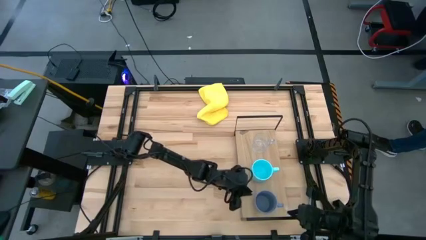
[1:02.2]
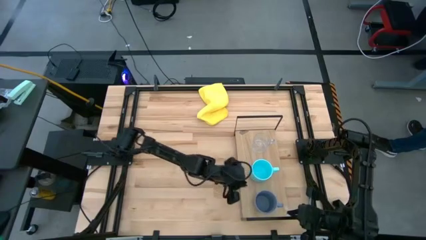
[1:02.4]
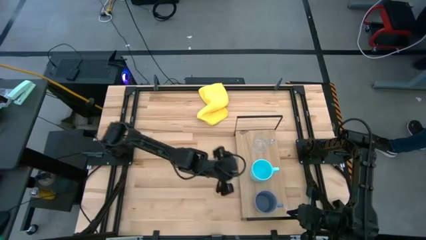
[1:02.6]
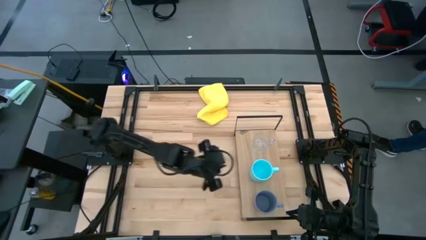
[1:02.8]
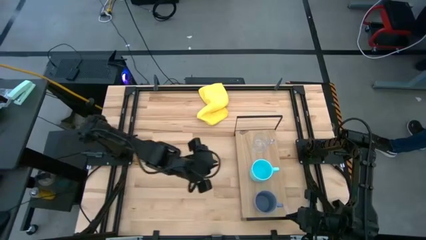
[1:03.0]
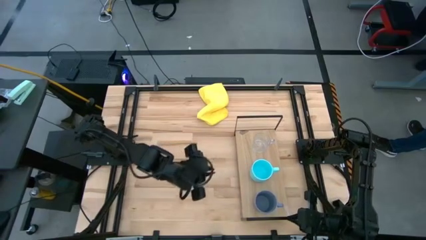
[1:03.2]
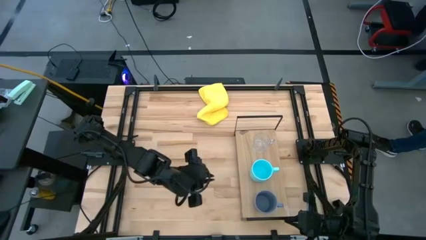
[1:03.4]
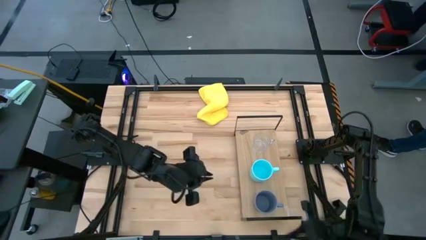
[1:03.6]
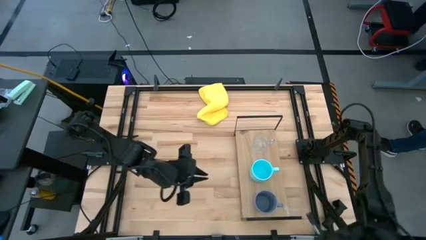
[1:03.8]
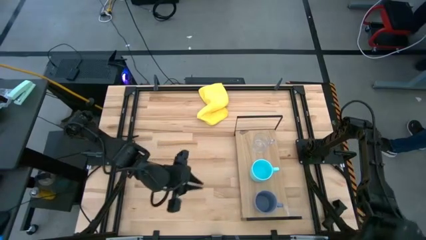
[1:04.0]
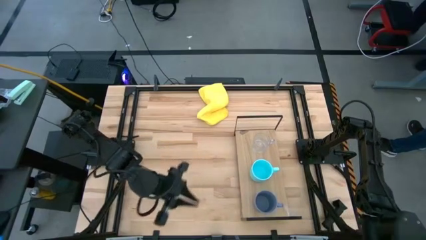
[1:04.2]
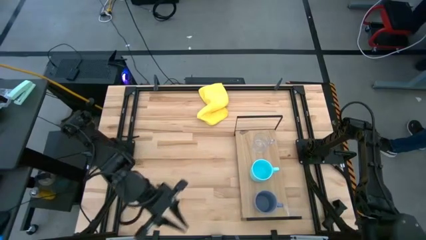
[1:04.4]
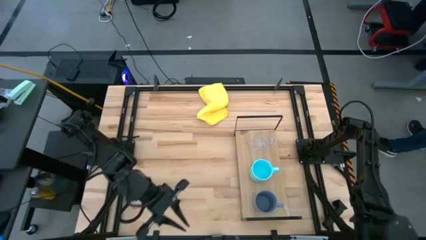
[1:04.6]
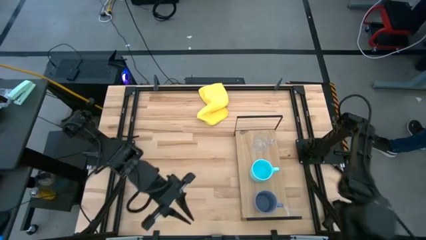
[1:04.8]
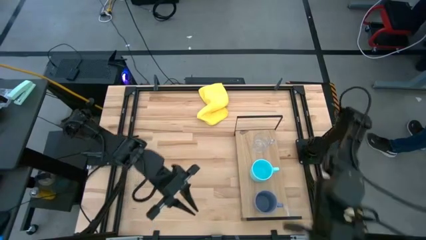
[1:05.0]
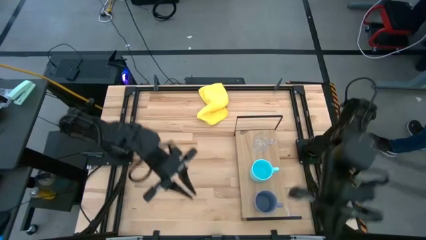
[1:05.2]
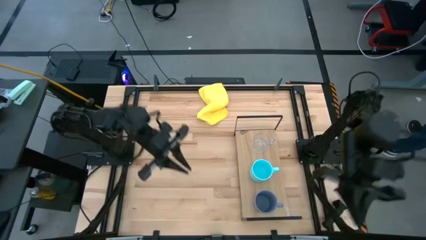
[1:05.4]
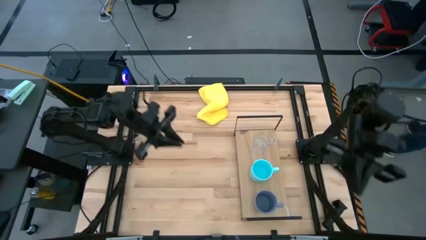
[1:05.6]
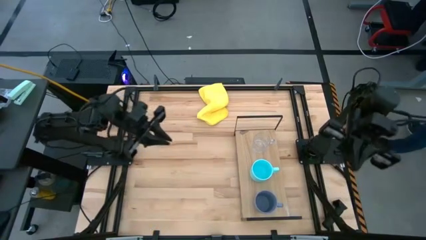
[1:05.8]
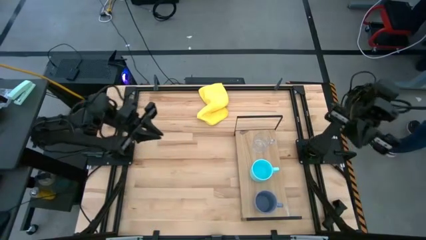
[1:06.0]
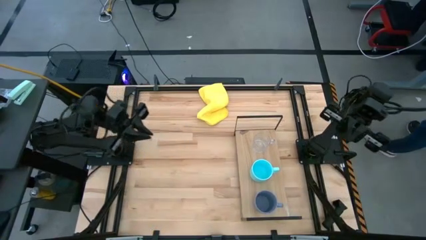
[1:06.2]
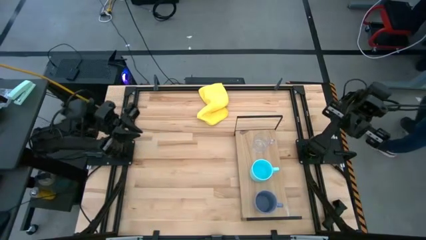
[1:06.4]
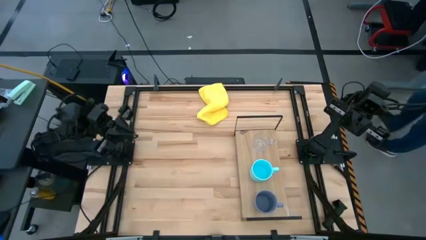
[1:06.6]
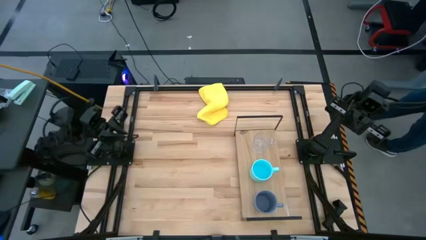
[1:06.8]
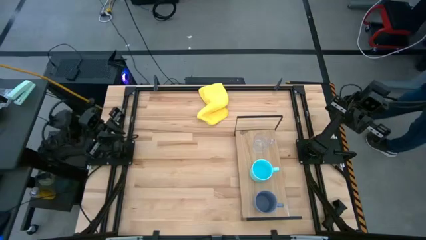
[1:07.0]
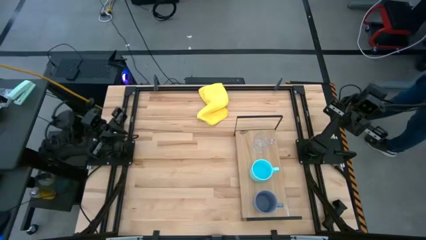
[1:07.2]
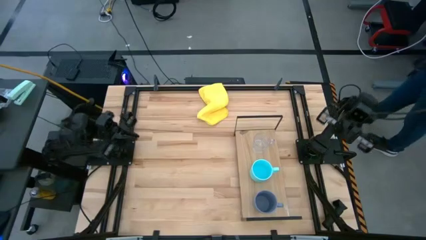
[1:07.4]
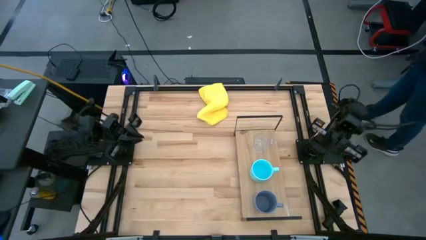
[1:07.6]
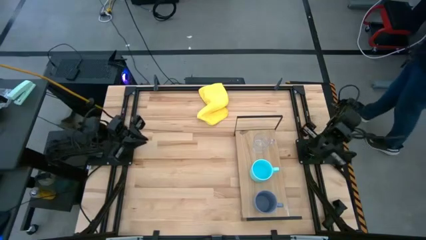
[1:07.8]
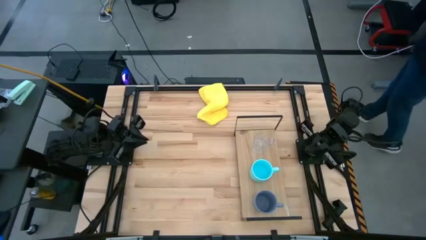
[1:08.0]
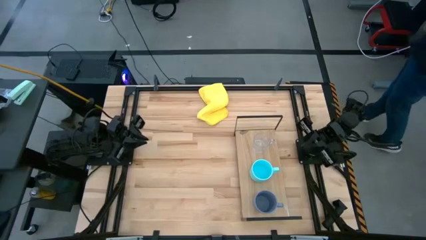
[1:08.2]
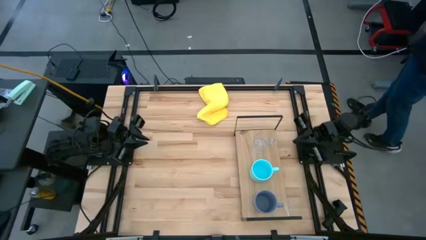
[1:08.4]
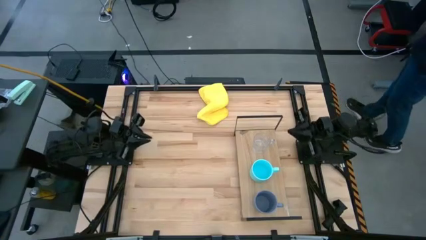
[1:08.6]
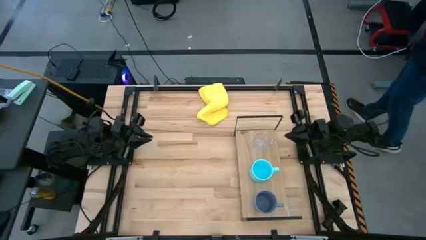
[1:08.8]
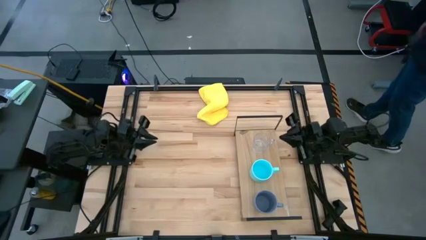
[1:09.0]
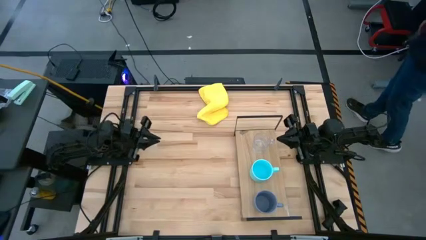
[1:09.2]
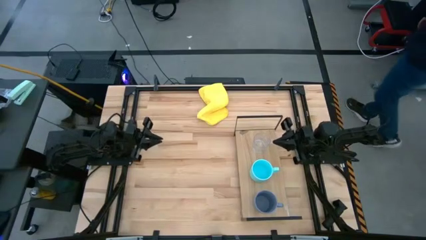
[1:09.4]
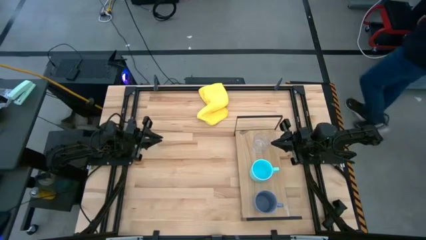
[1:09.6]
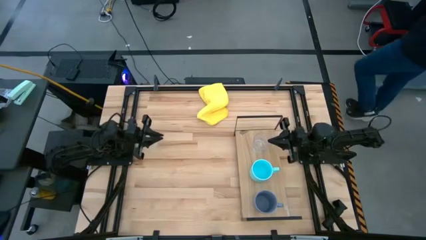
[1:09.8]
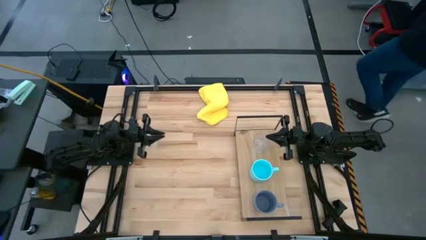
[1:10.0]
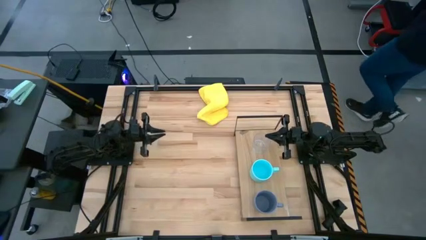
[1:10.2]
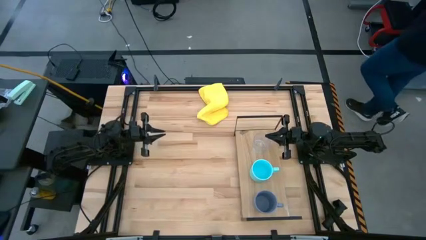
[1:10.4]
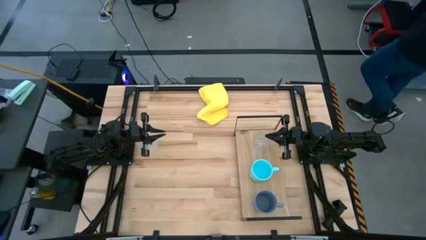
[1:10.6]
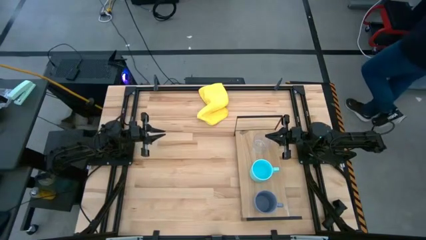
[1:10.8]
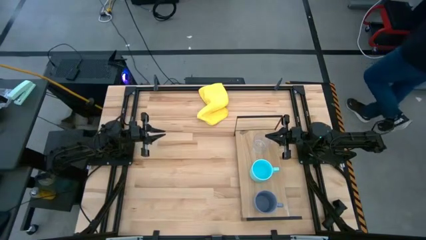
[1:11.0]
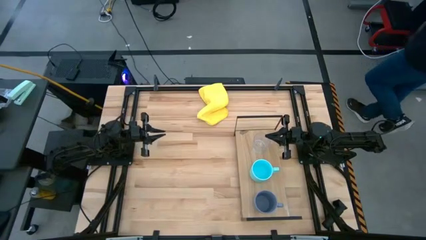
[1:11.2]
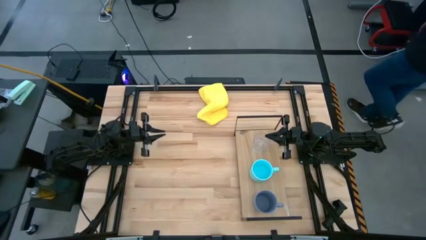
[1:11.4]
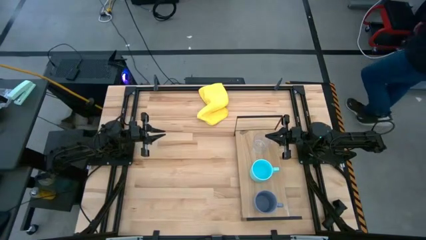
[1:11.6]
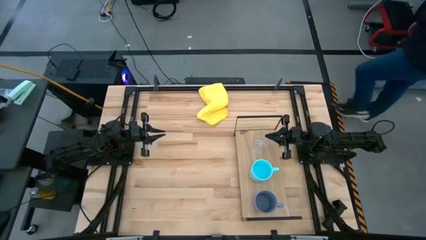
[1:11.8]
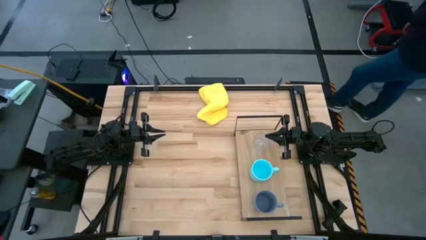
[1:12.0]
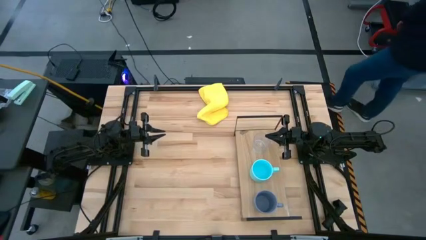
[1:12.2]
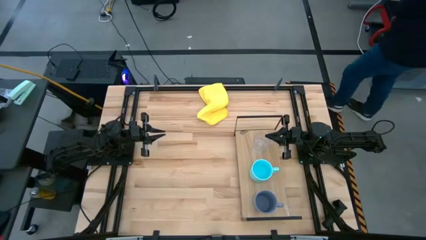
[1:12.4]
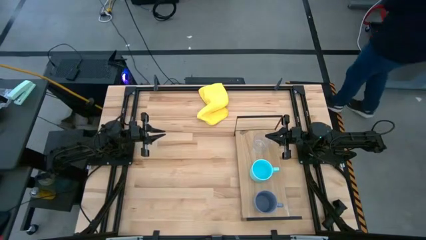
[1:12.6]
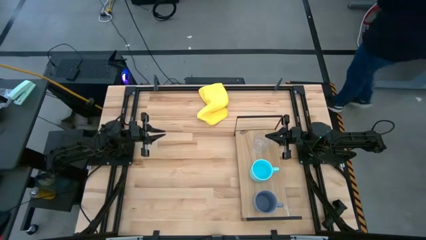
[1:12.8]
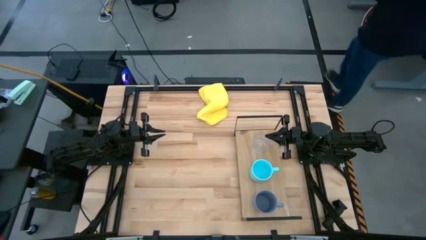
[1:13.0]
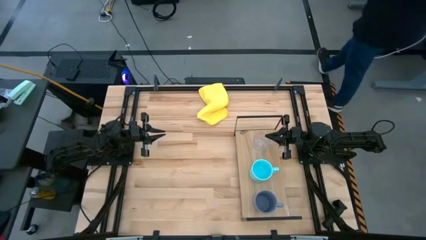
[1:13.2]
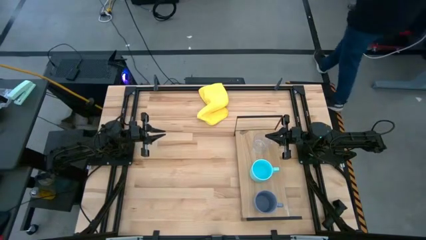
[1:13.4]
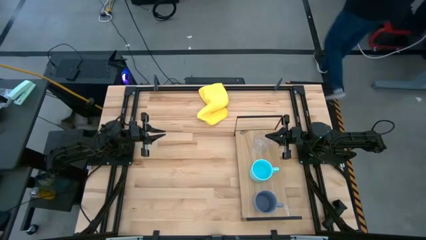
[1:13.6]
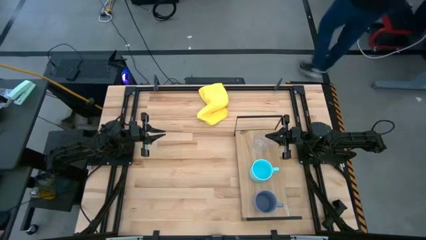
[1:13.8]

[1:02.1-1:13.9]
Task: Stack small to large cups/mugs on shelf
Return to Home Position

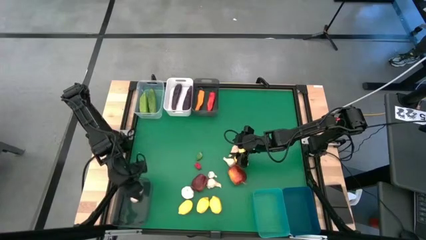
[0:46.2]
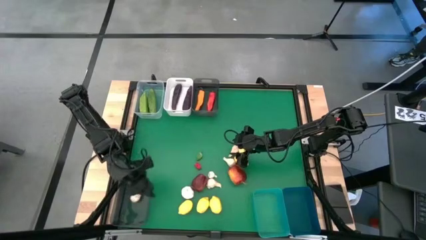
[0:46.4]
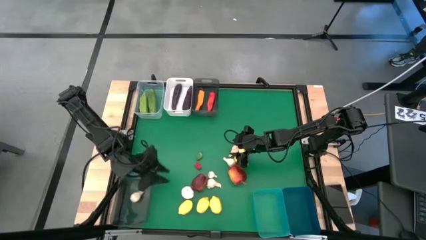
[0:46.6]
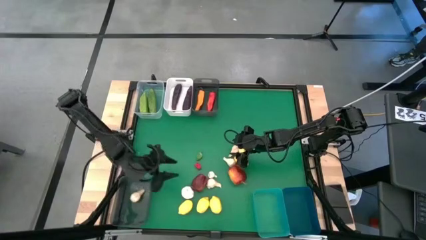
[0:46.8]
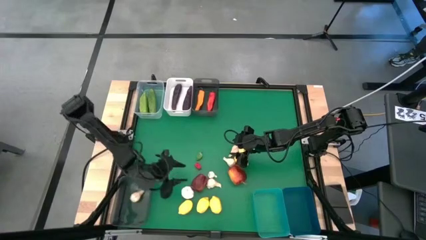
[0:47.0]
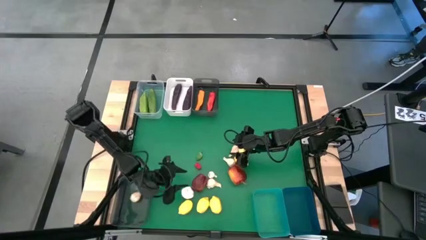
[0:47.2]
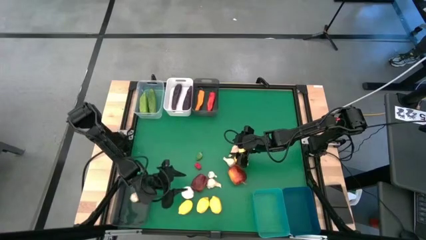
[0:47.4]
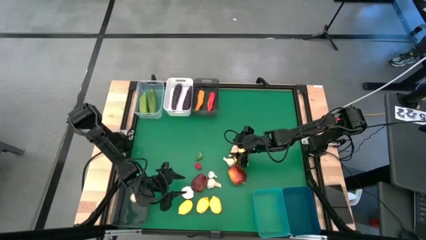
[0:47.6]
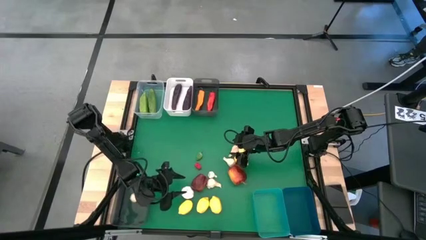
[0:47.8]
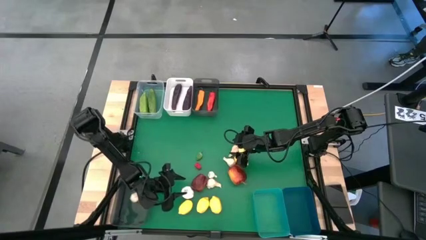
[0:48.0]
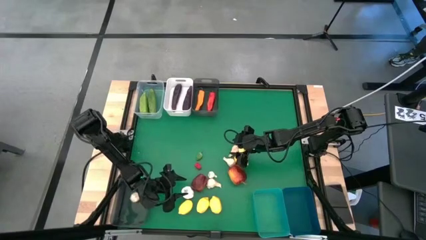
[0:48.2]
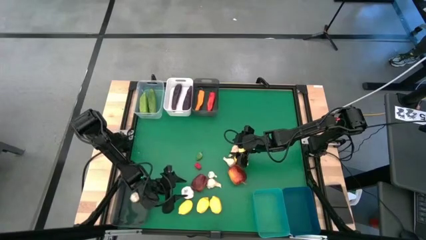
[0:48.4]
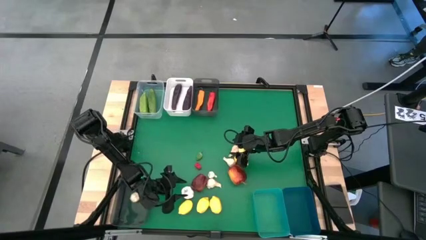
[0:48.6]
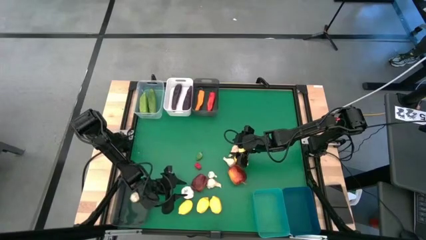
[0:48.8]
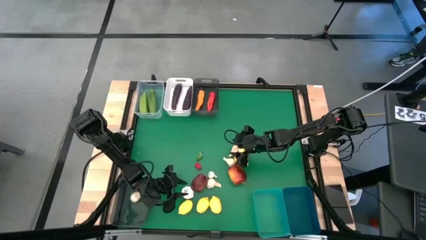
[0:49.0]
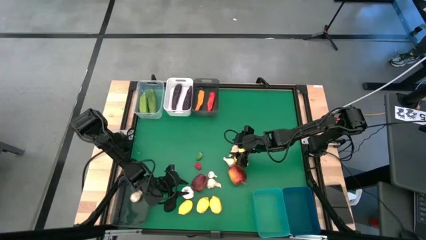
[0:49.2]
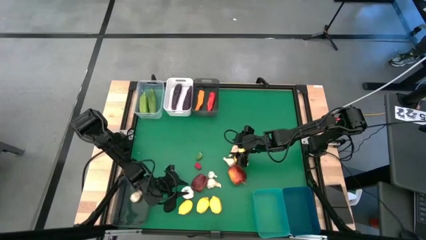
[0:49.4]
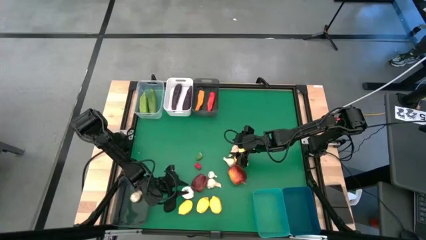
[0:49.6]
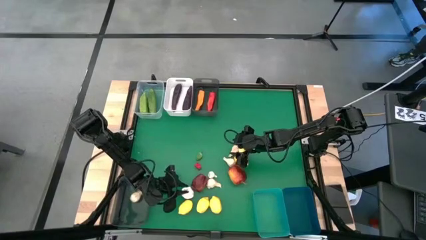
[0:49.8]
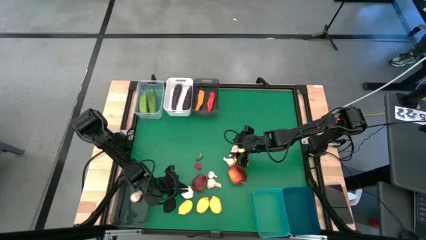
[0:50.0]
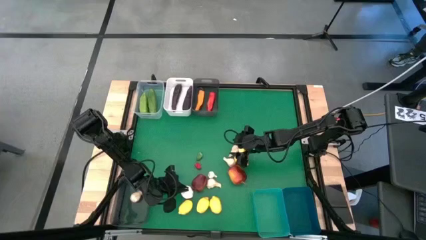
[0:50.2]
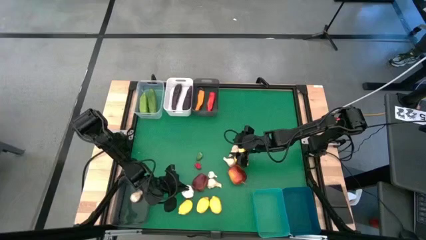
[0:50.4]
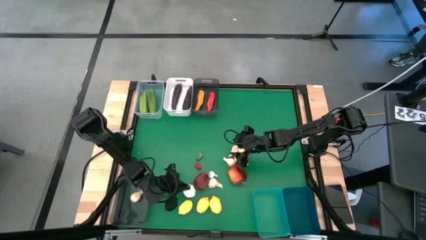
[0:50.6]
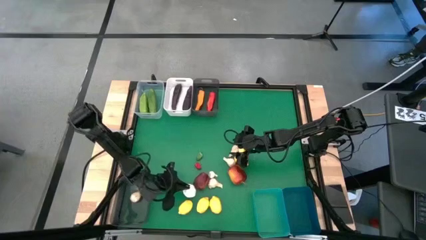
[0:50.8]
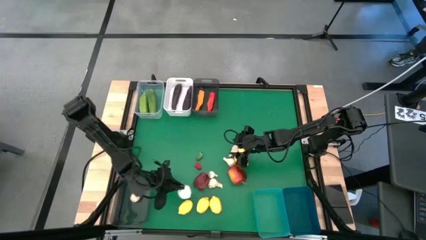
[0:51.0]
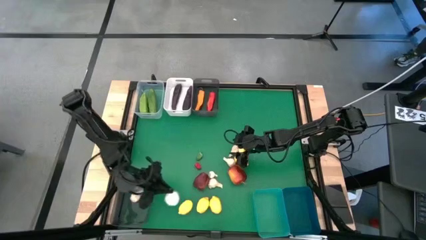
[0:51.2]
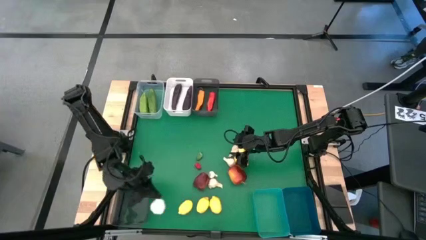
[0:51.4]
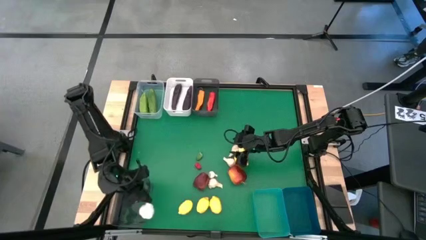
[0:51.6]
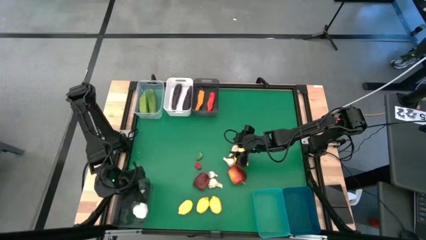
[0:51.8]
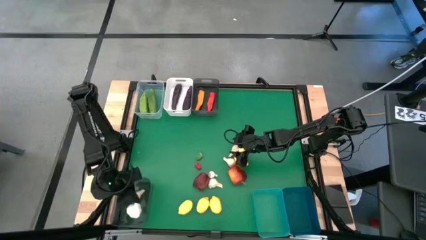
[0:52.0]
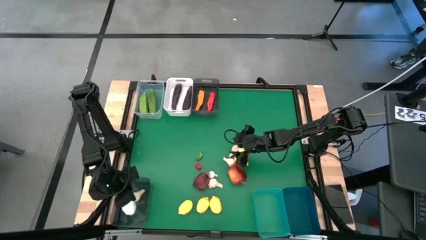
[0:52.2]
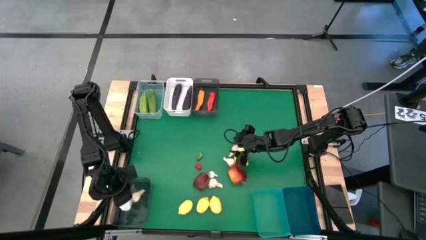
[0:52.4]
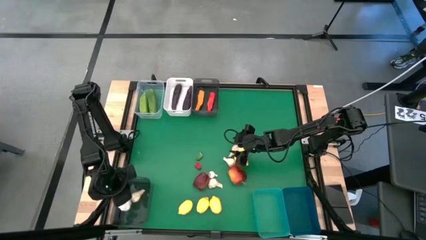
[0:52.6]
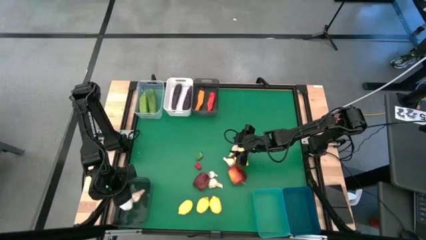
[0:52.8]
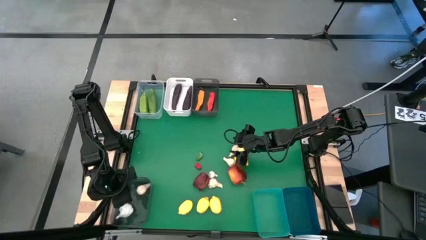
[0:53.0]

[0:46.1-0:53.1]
Task: Sort produce into baskets
Put the white garlic into the bottom black bin
